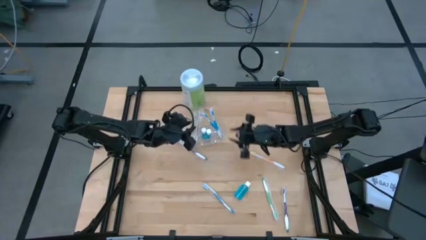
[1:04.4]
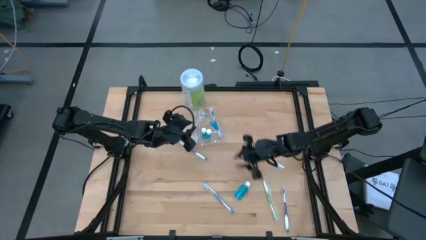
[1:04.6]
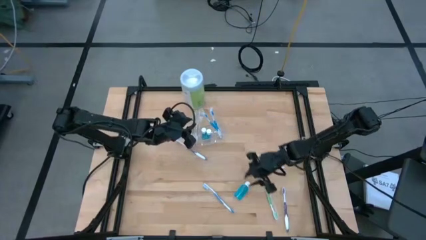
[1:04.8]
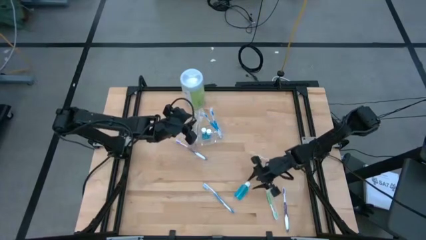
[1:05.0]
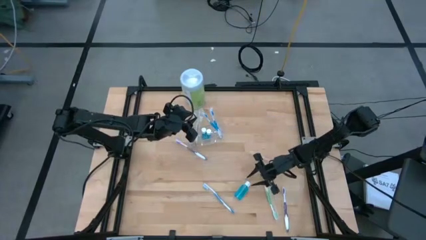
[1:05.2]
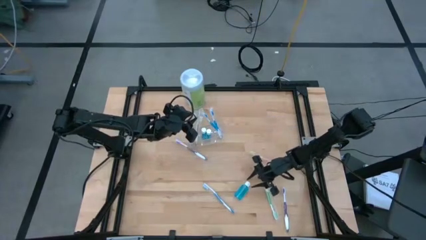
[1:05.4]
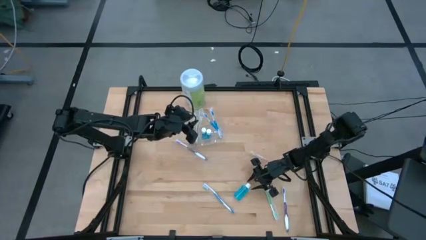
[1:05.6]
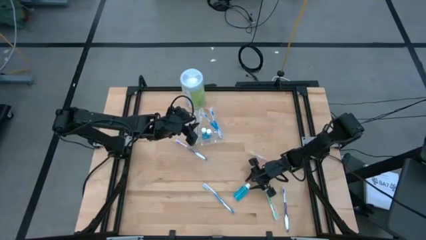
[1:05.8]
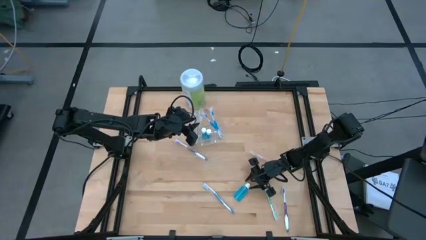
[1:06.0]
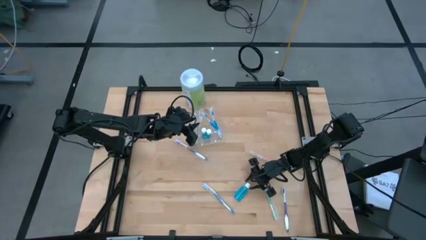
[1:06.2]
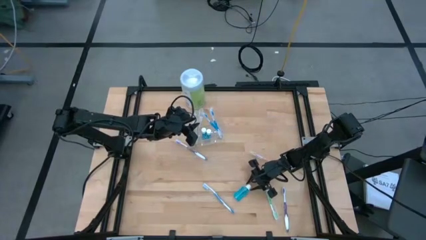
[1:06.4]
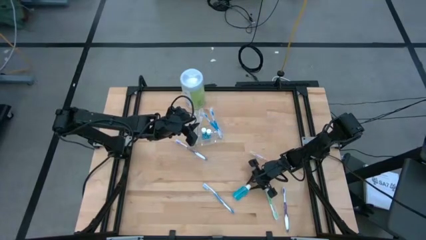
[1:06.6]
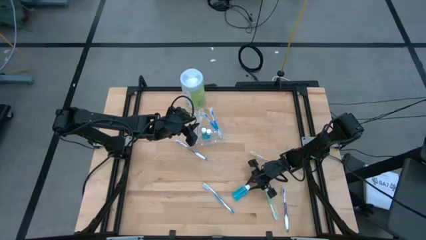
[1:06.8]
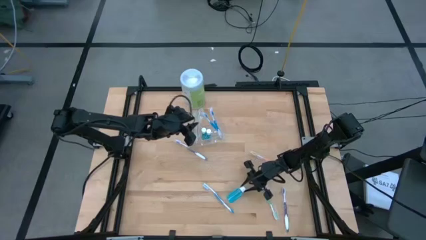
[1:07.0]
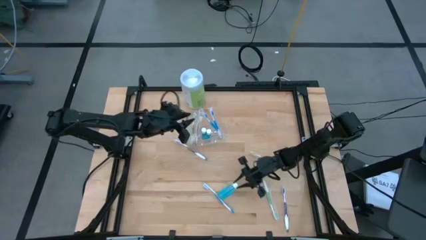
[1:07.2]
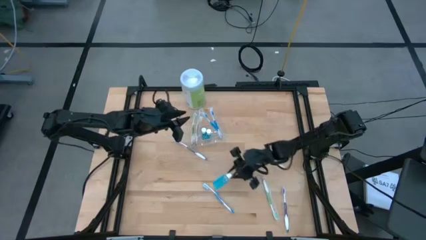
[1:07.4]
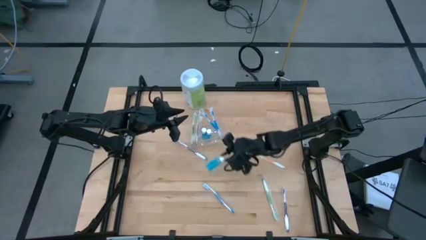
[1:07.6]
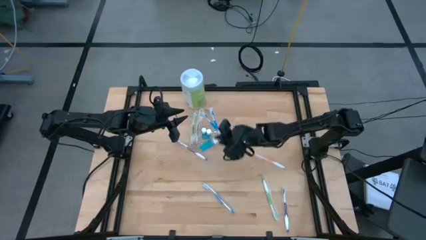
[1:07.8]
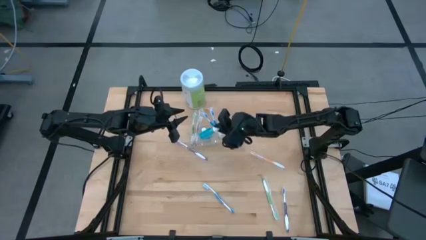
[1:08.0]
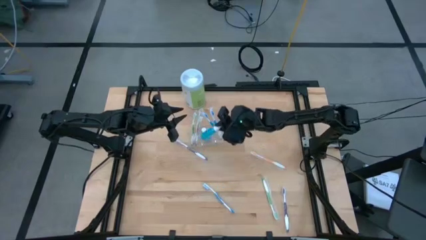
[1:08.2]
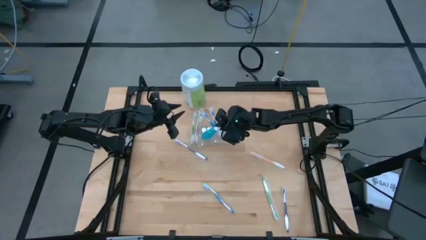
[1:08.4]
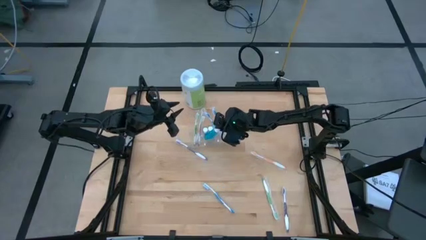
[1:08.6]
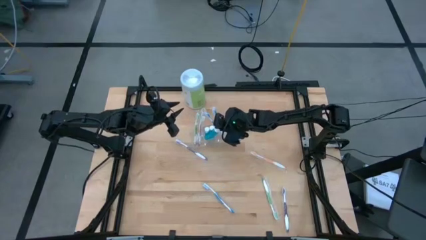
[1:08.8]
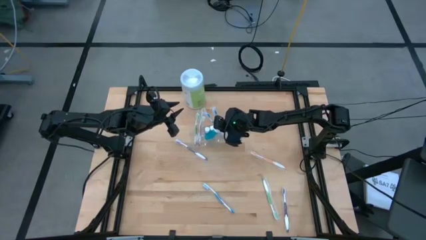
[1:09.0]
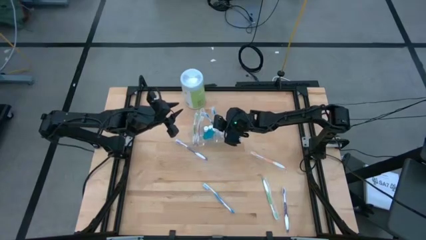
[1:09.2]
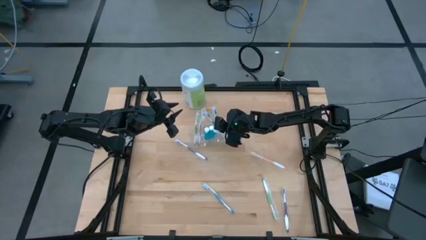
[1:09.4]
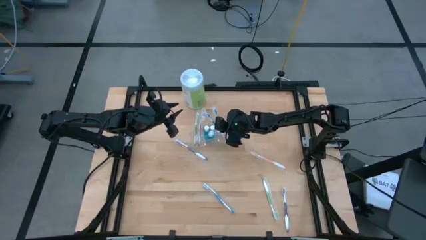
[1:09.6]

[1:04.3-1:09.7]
Task: Pick & Place toothbrushing station
Put the mouthwash into the center of the transparent organizer

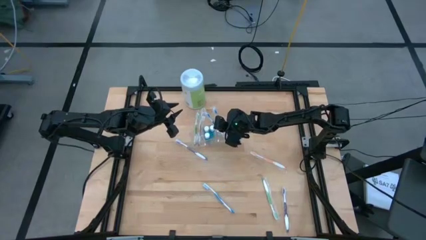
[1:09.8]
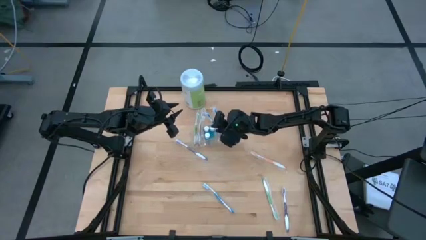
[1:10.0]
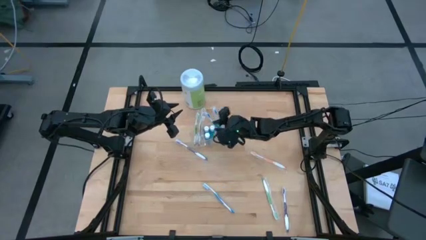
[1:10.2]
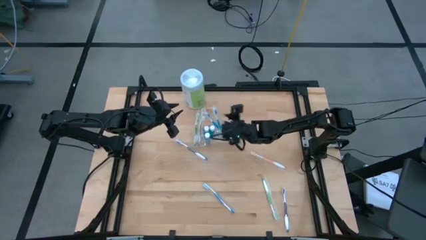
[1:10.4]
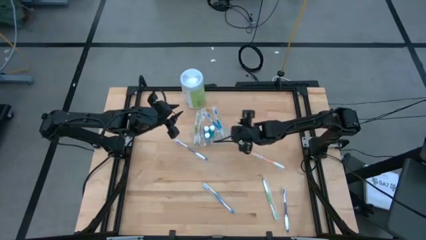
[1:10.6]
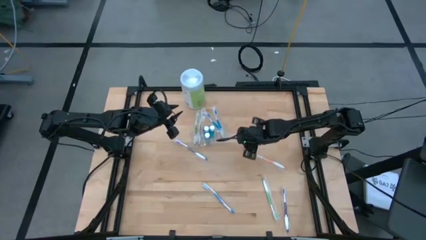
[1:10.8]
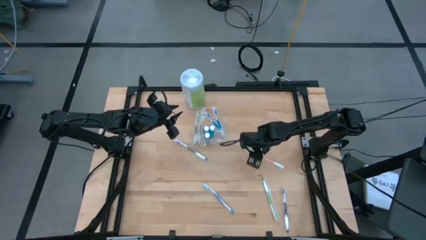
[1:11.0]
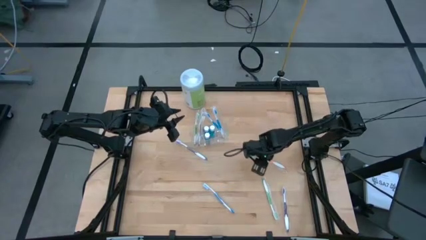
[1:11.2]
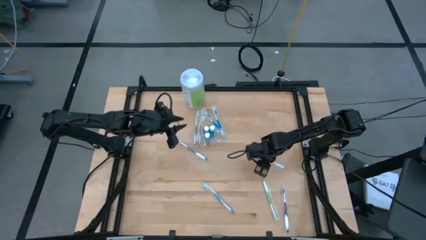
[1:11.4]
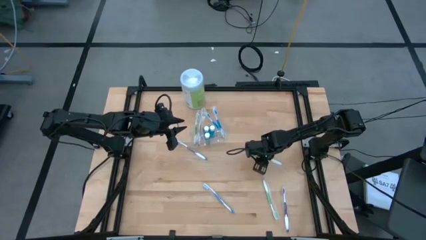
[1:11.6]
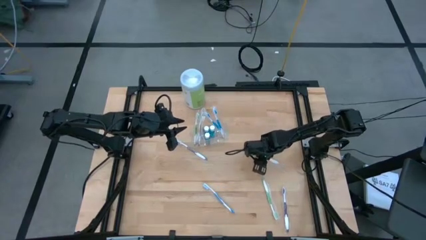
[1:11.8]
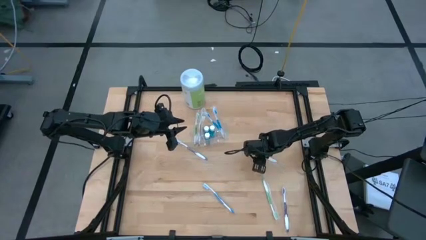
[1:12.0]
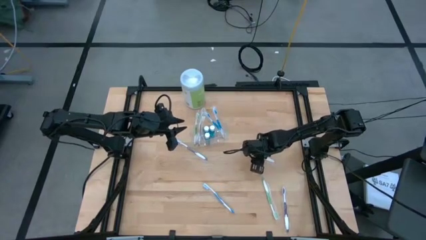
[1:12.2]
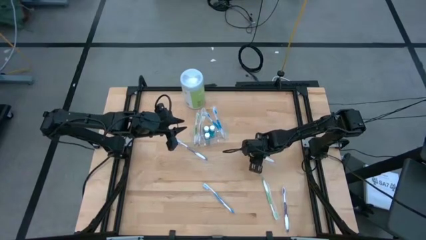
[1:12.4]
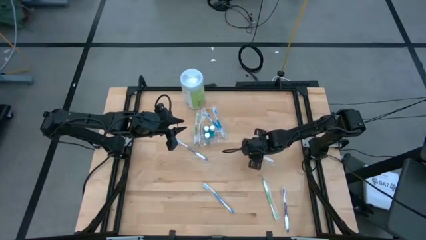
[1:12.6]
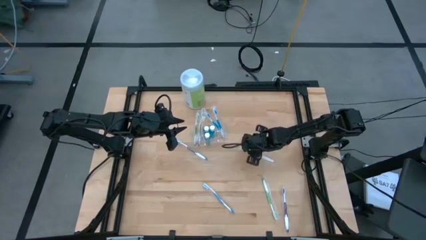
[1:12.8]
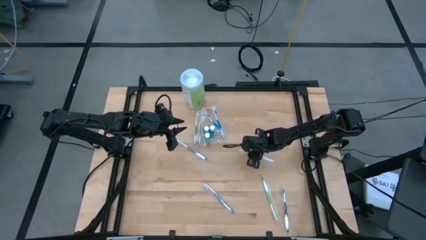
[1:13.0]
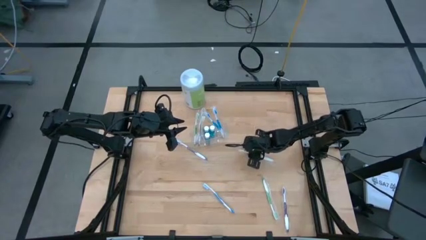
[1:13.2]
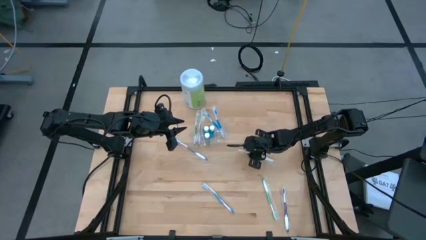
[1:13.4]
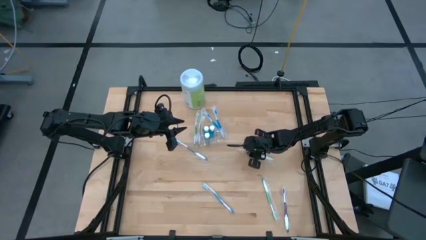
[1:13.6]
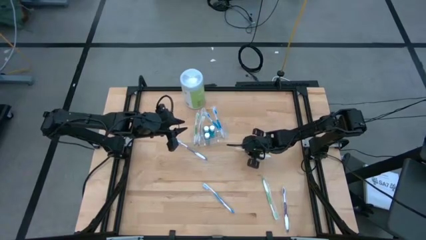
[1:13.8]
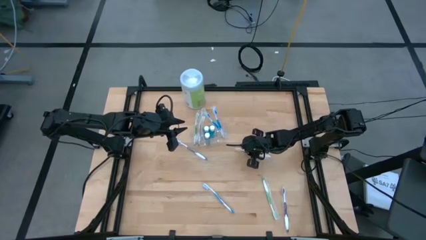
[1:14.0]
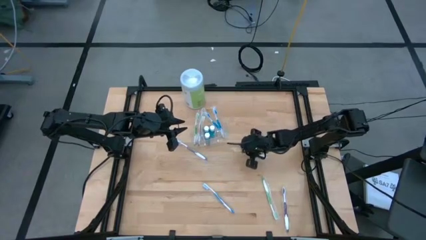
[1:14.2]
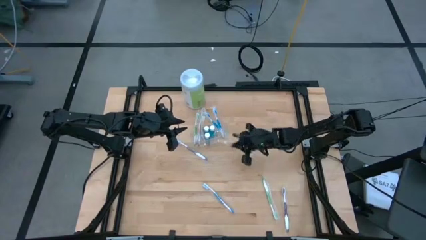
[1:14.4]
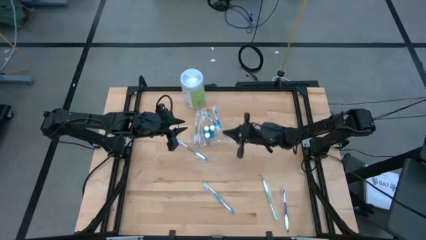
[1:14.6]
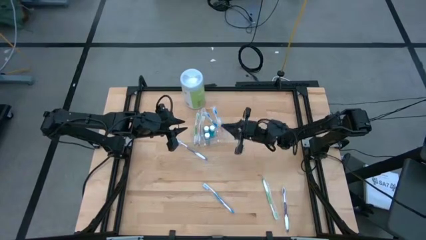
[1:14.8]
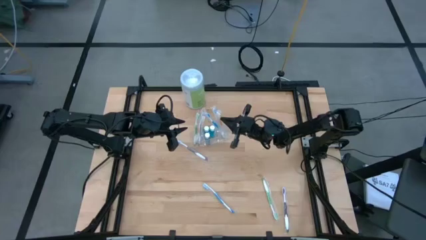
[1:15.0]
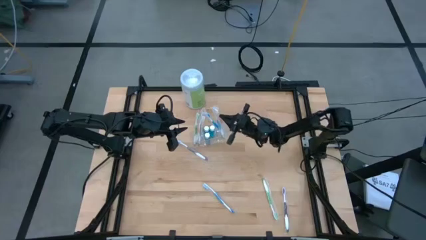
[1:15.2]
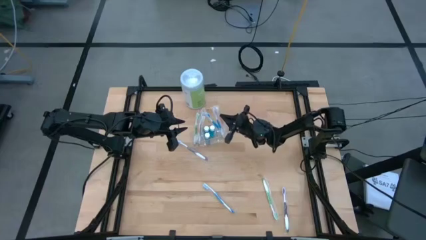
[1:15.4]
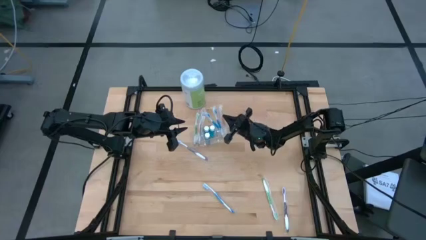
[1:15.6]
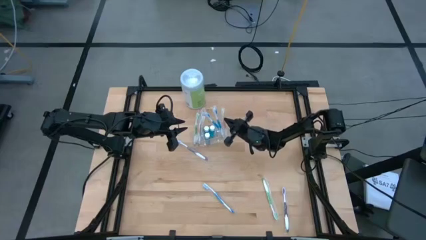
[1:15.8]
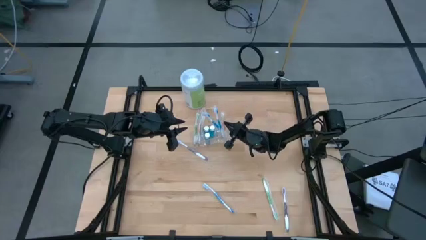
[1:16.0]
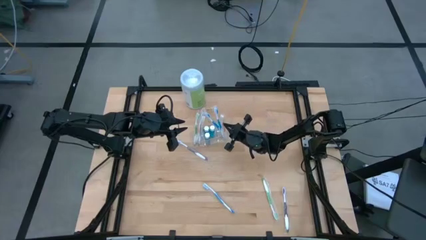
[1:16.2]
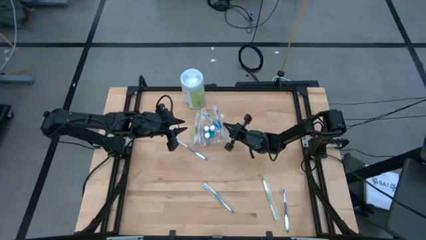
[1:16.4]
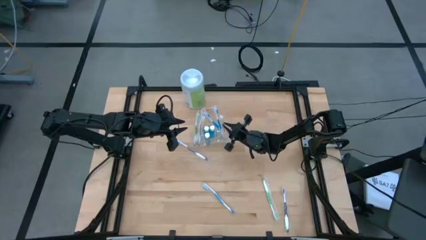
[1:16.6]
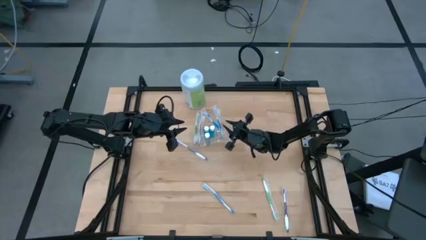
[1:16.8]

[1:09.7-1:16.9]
Put the orange toothbrush into the right side of the transparent organizer
